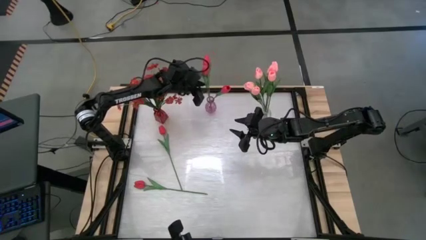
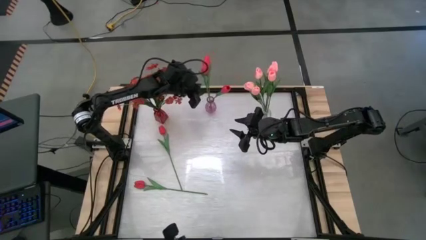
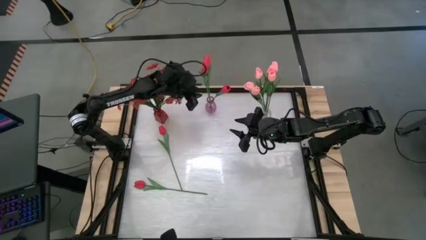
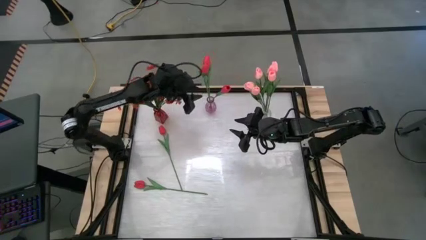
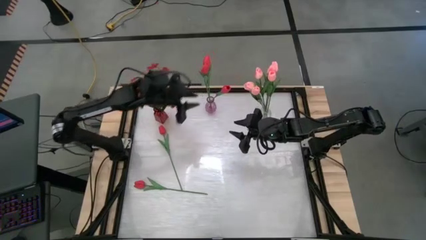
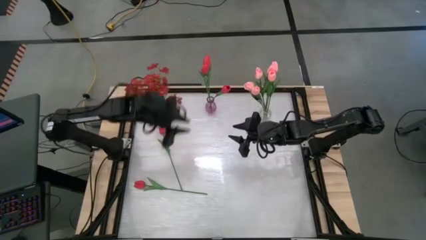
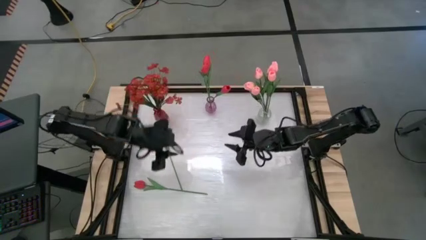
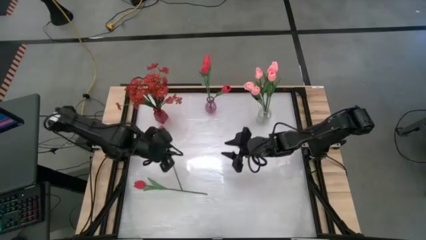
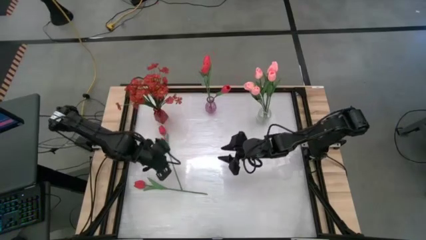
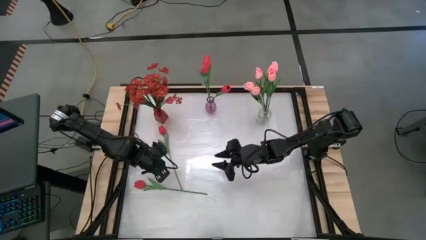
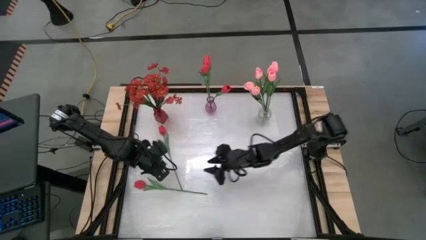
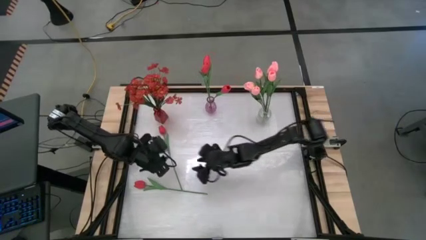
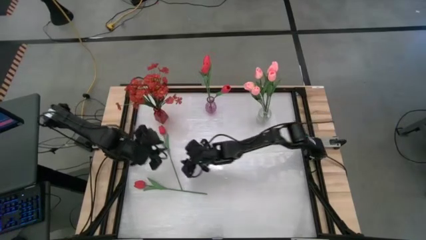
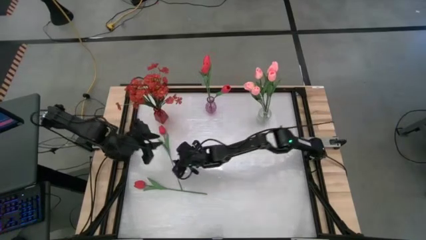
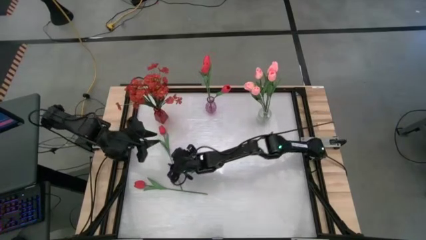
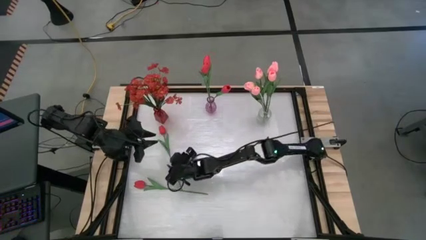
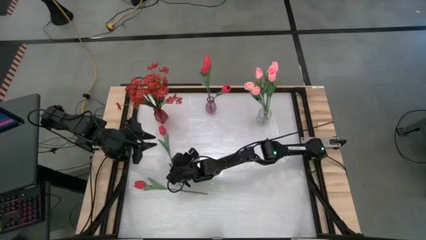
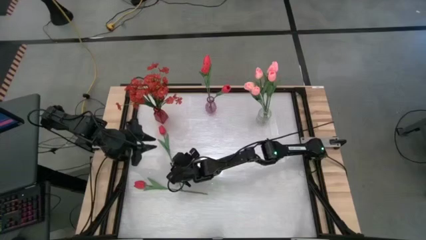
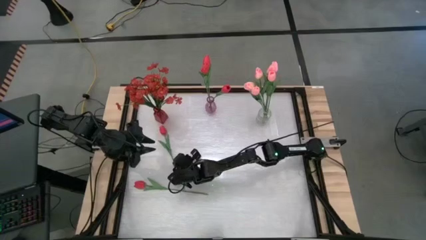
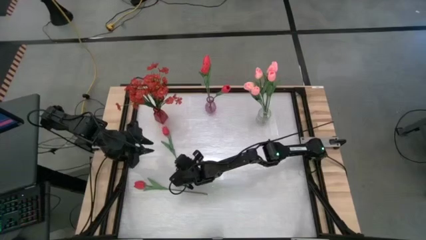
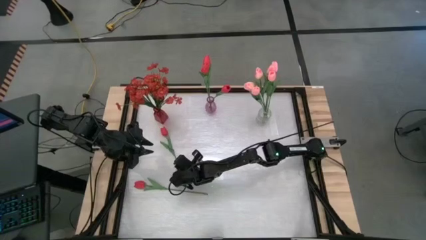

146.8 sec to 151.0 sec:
Task: Sort flowers into vase by color
Put the top red tulip into the purple vase

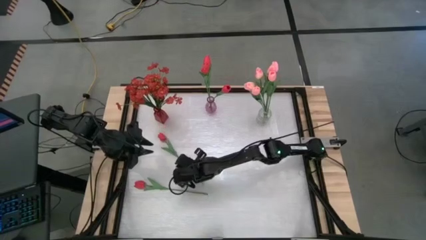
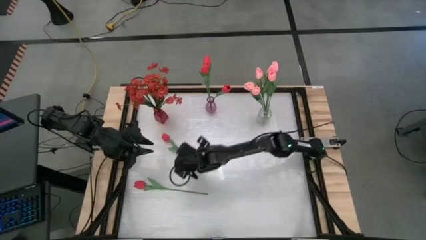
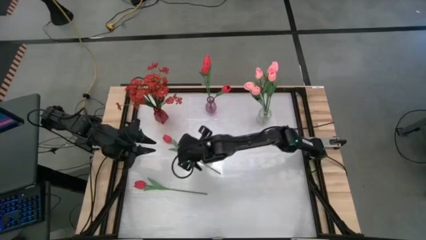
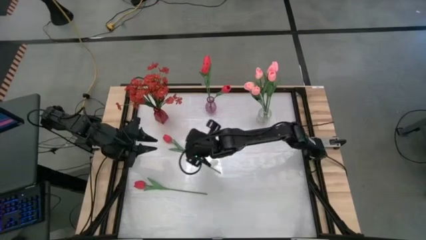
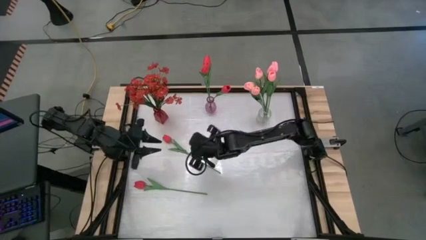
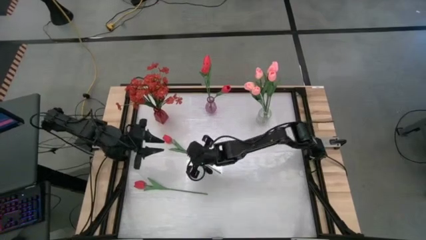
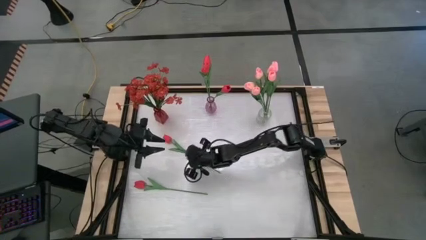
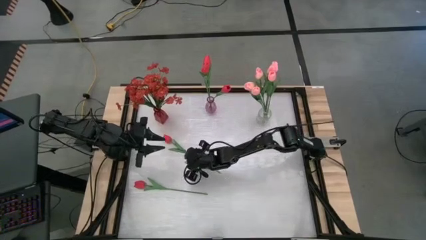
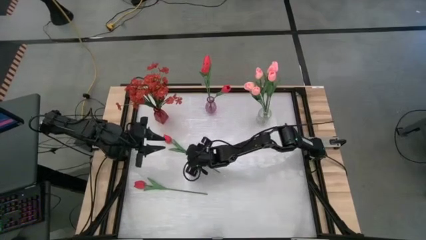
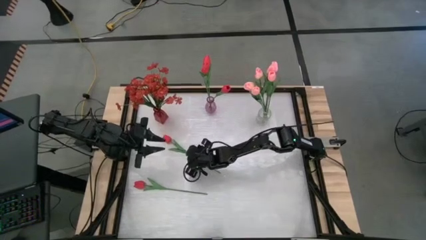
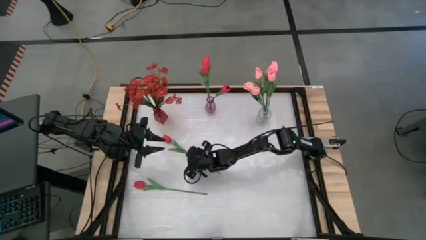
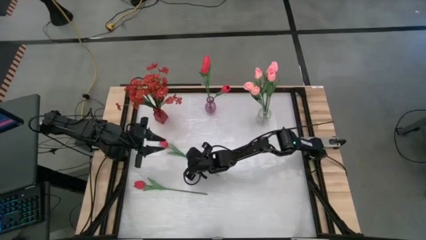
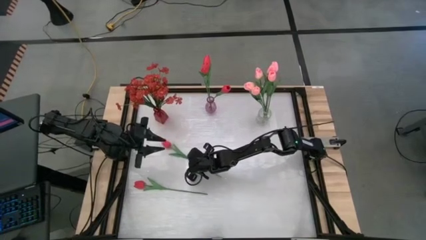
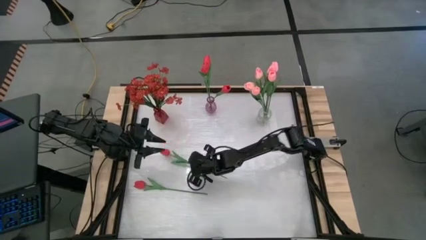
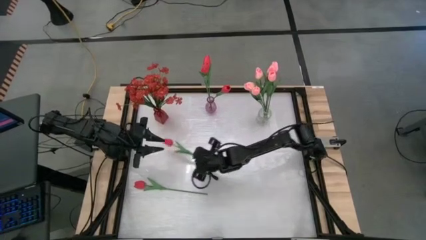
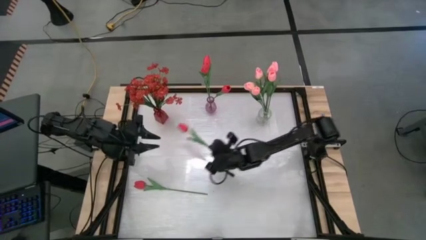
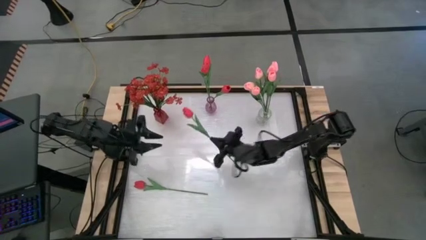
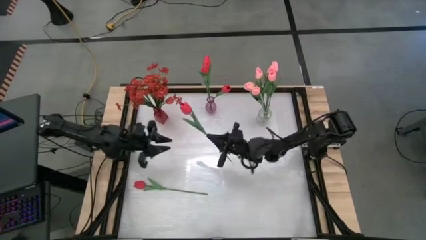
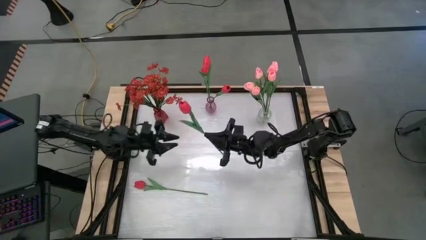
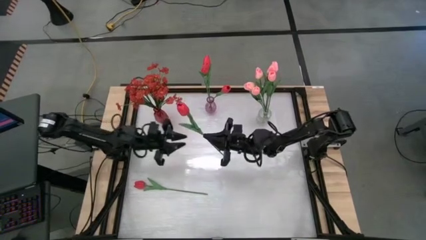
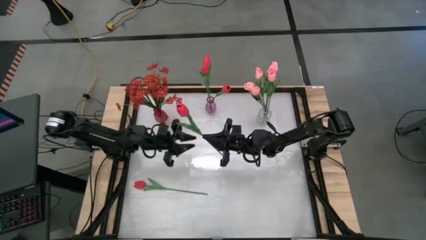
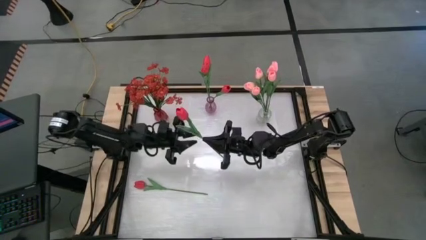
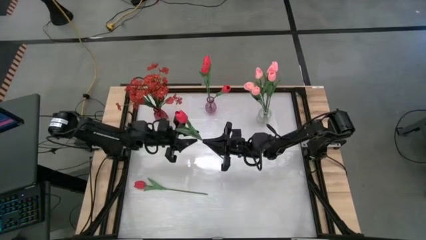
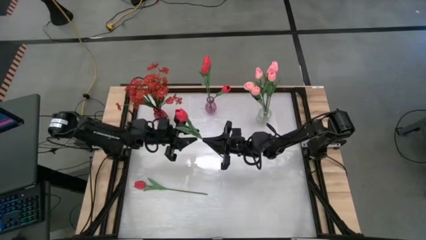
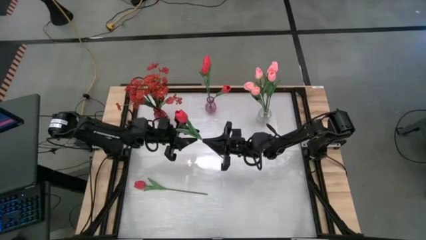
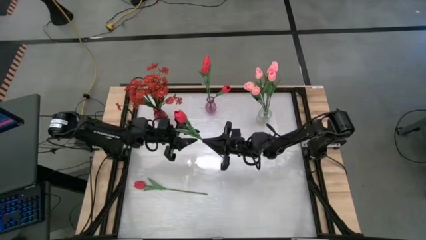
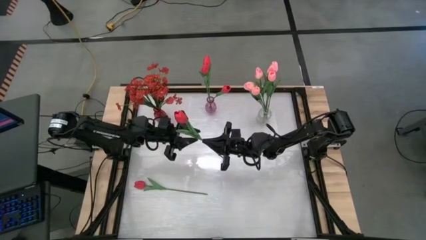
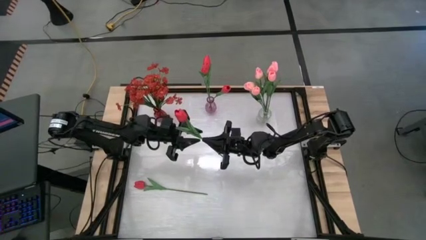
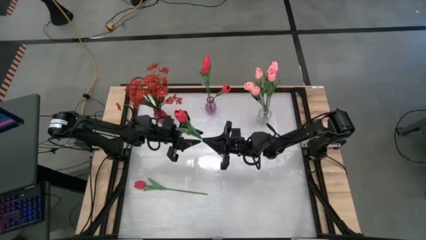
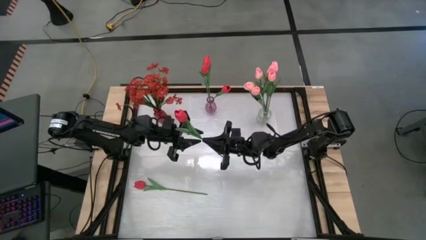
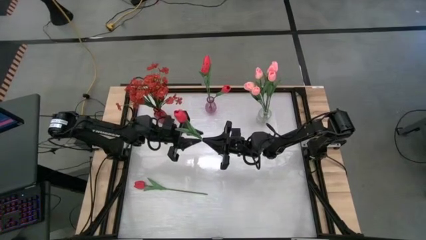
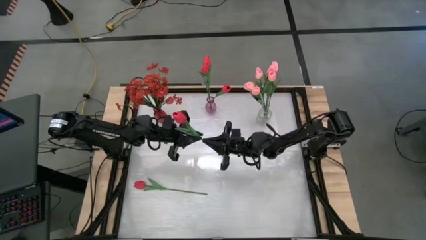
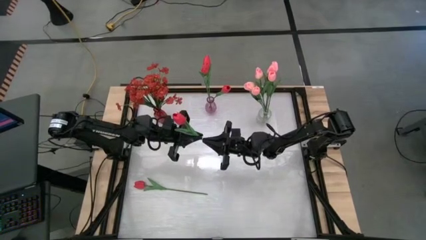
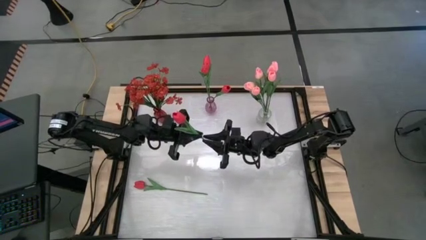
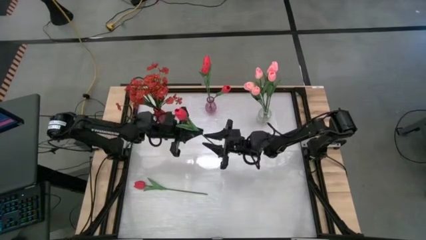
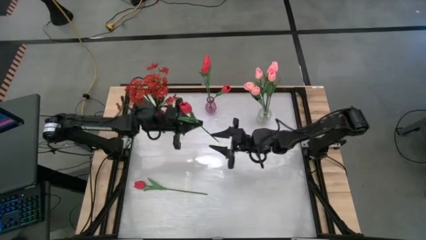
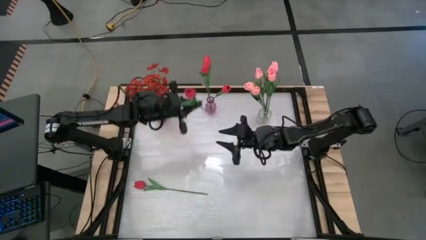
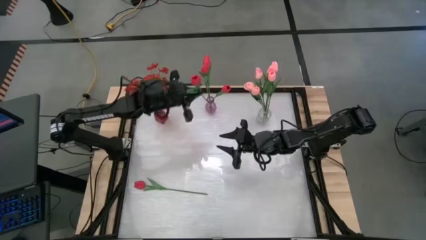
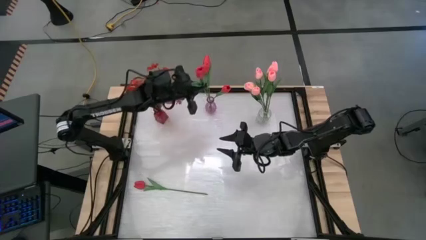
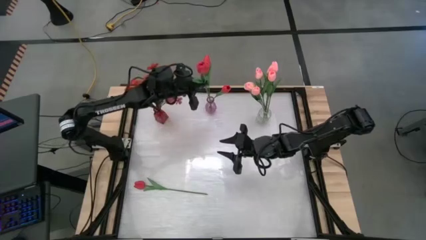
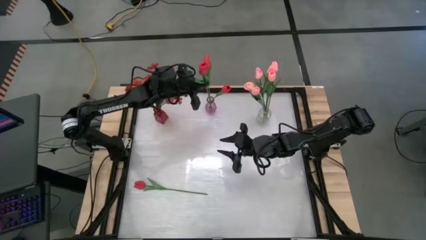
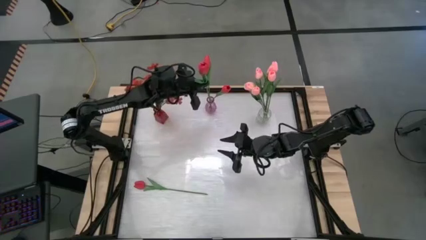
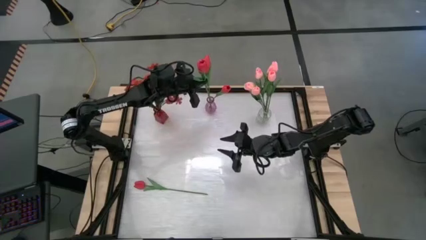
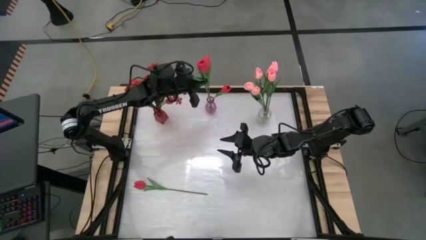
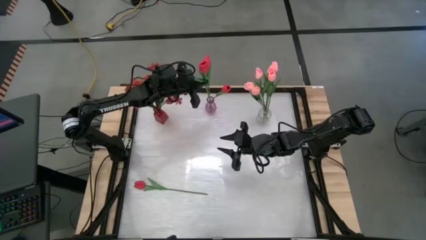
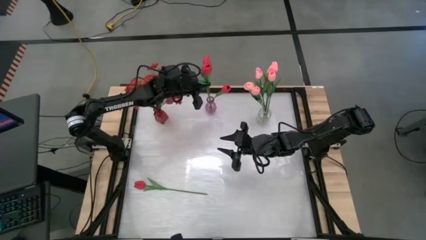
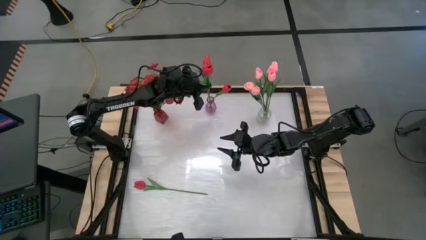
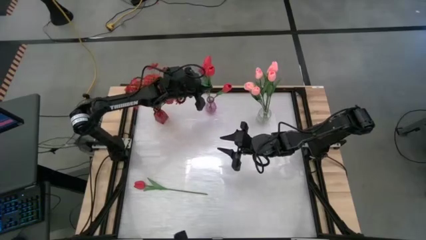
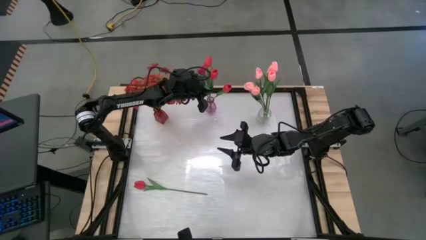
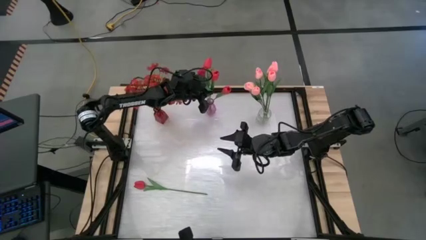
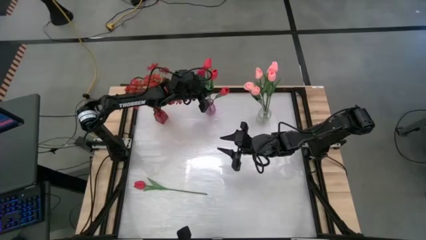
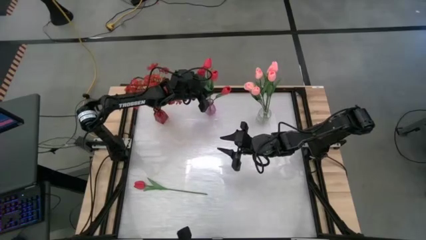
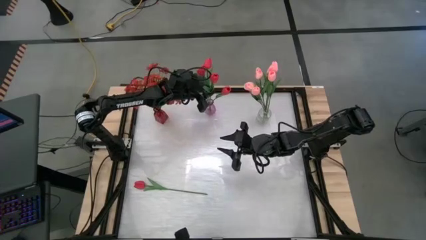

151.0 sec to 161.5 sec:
Put the top red tulip into the purple vase
